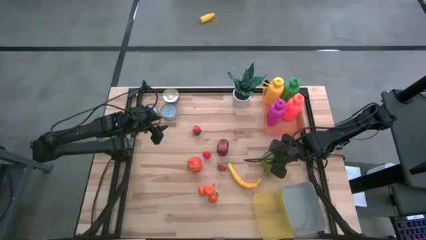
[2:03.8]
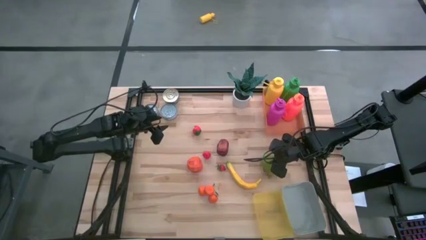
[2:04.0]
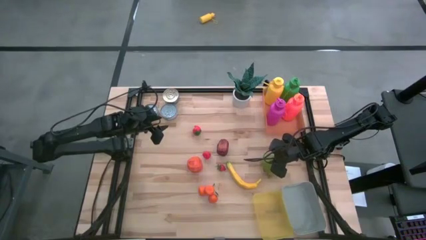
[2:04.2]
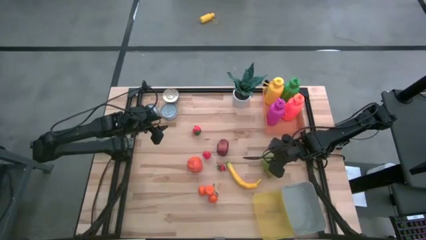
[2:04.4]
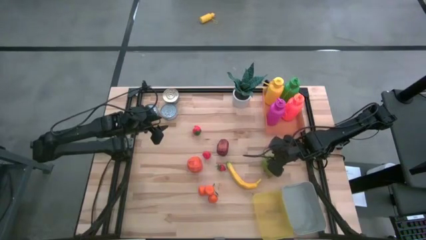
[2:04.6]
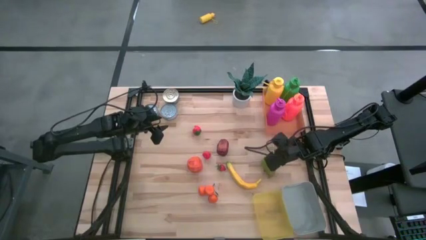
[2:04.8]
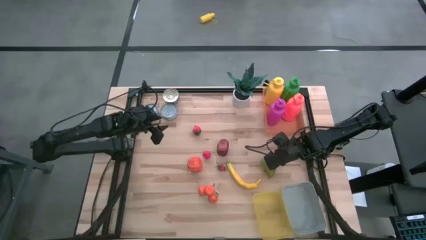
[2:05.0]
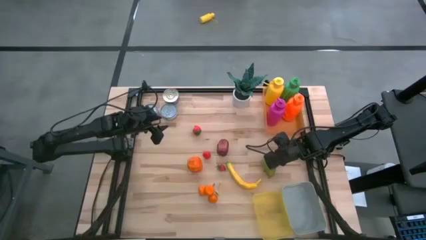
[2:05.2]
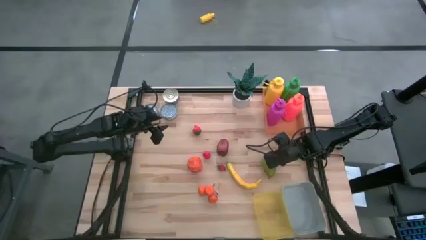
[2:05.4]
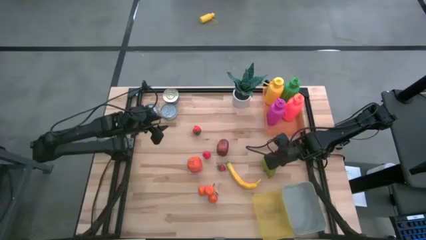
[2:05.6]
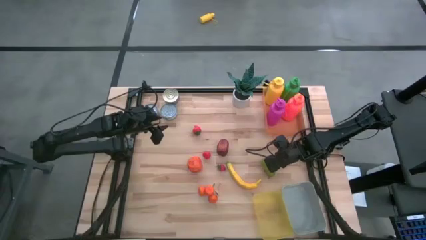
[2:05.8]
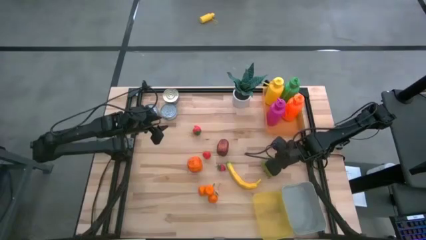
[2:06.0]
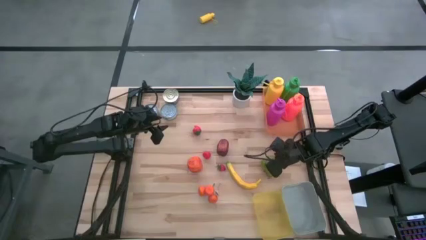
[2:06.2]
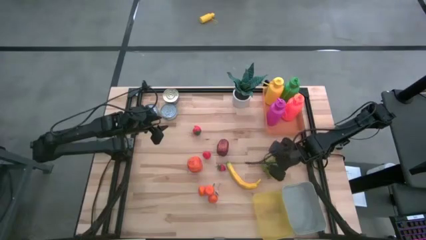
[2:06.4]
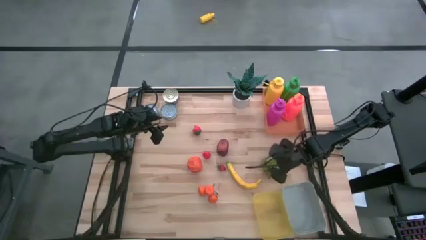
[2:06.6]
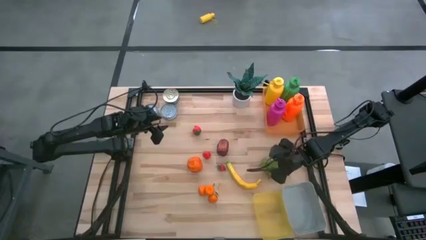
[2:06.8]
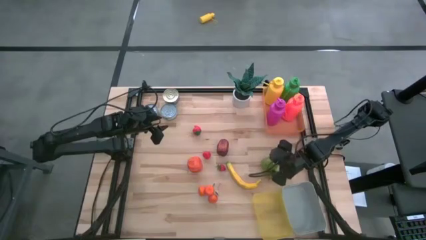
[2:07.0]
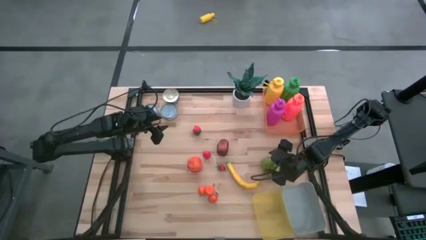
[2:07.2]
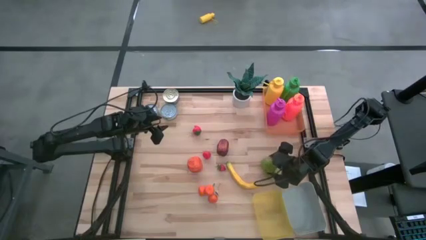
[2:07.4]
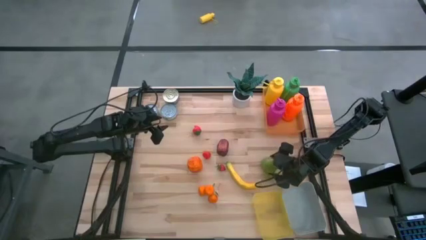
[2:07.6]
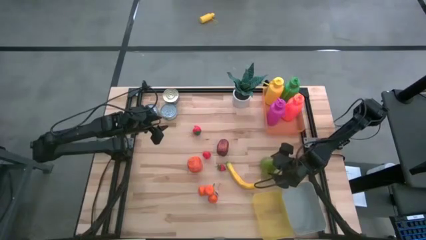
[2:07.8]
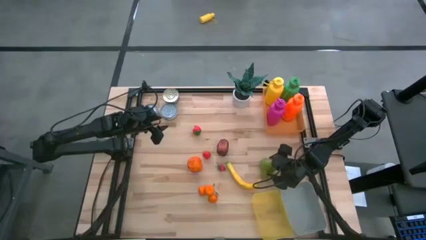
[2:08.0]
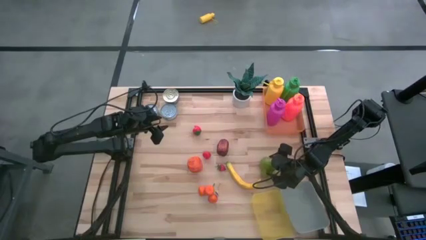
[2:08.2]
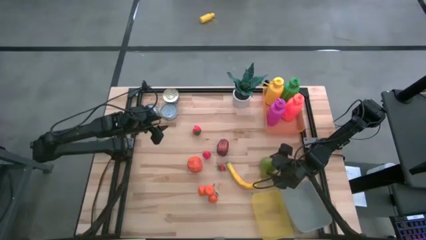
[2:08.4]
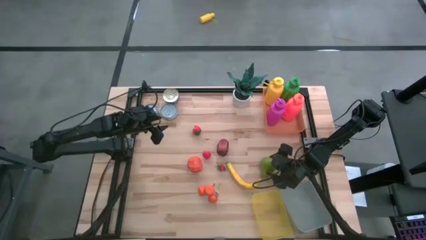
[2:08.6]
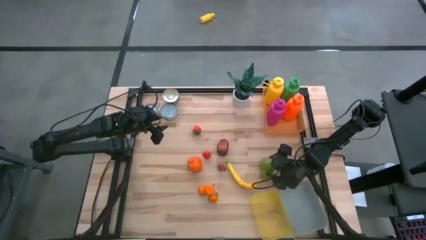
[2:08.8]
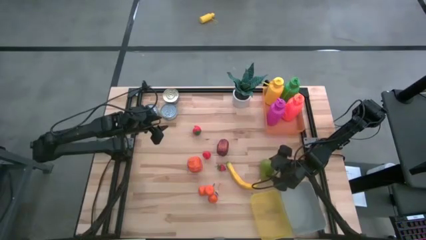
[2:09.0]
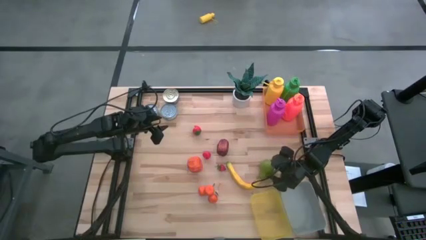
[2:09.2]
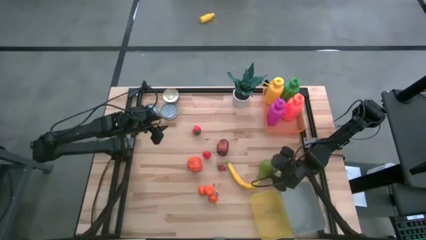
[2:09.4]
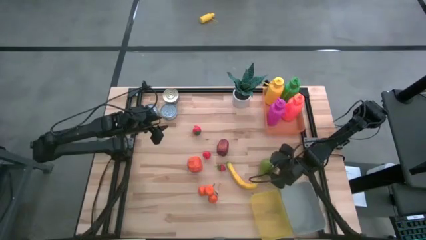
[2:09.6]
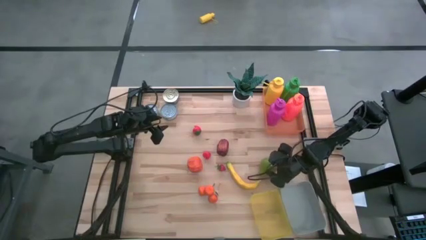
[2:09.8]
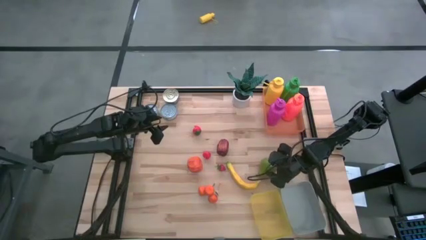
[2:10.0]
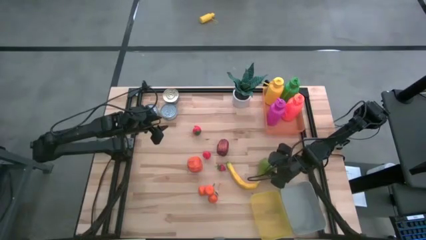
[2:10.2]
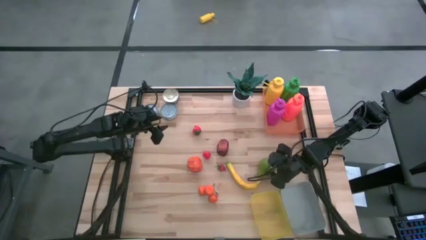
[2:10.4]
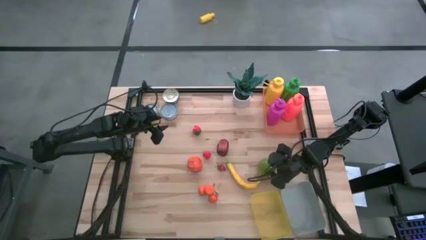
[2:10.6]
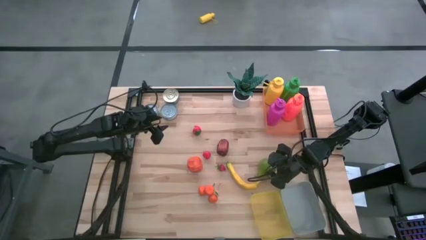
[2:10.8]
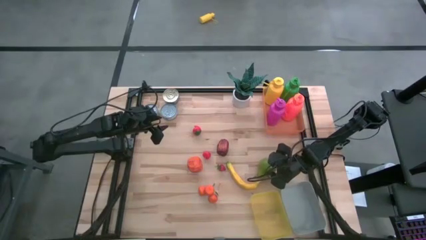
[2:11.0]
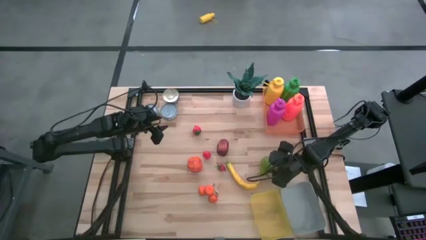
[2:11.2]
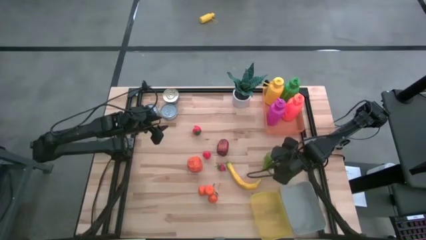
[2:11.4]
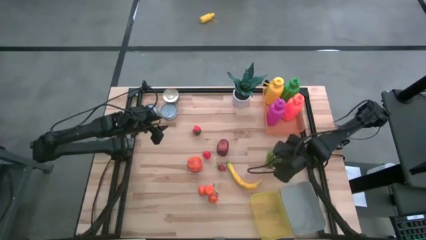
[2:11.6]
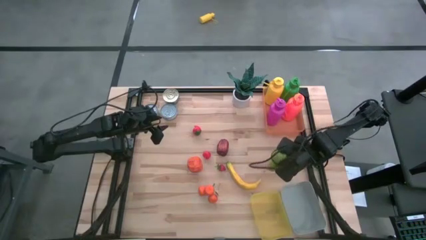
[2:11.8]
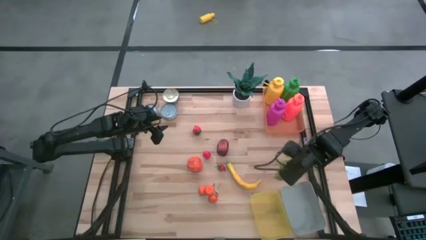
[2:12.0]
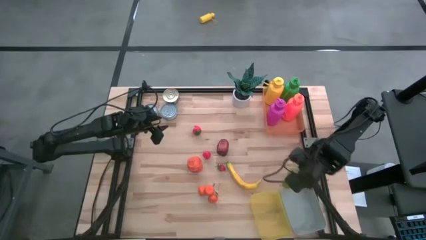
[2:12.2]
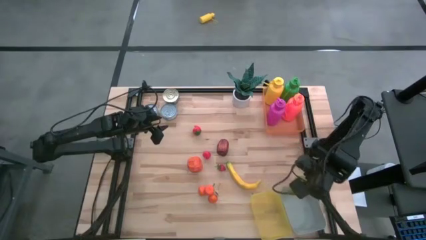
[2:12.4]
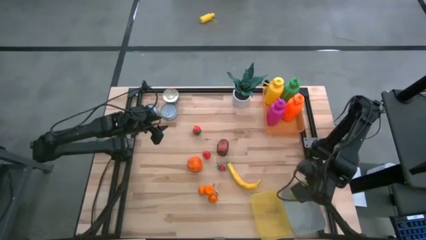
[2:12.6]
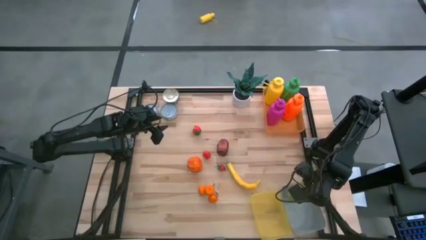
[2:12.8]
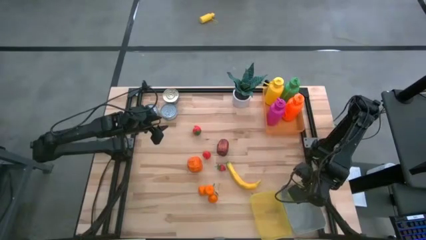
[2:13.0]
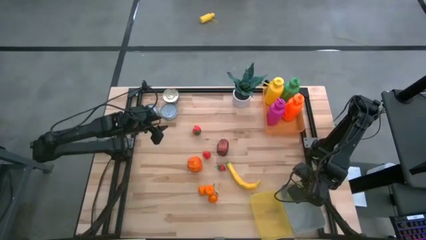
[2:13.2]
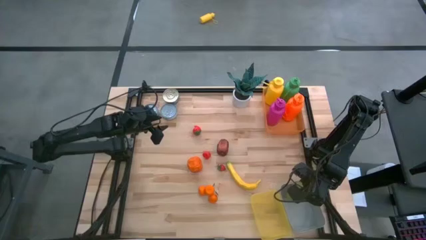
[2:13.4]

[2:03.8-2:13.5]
Task: Pick & Place Food Item
Put the green pear into the gray bin

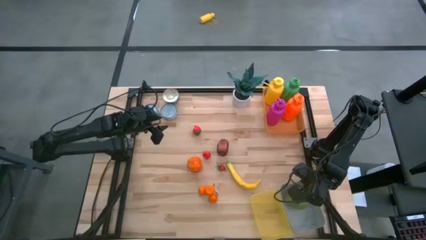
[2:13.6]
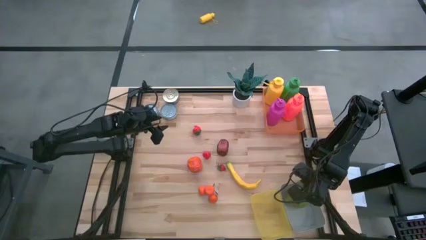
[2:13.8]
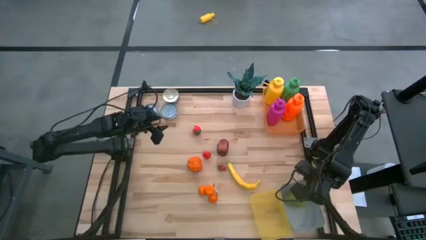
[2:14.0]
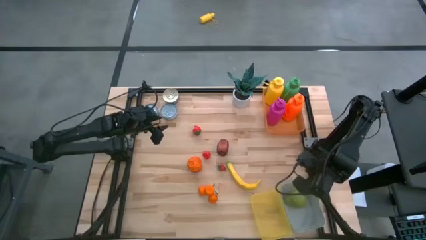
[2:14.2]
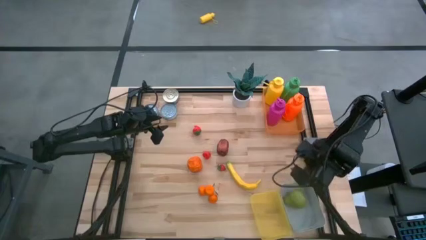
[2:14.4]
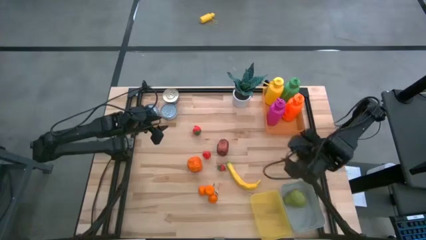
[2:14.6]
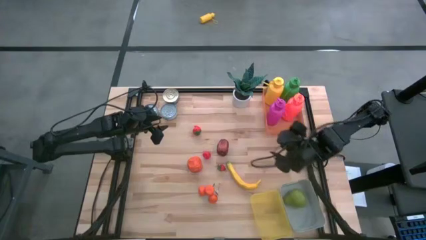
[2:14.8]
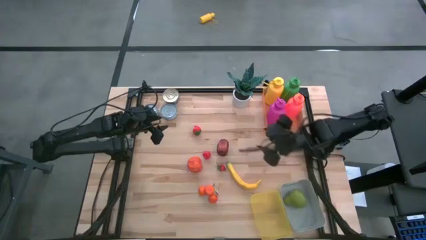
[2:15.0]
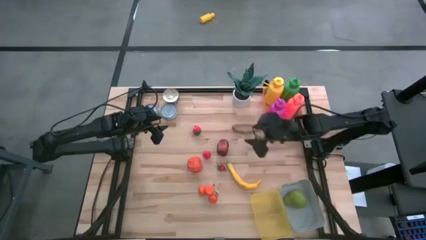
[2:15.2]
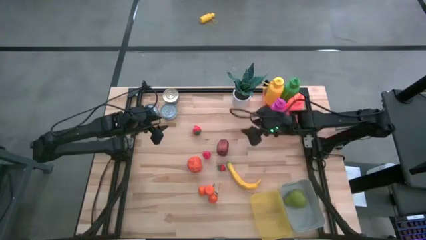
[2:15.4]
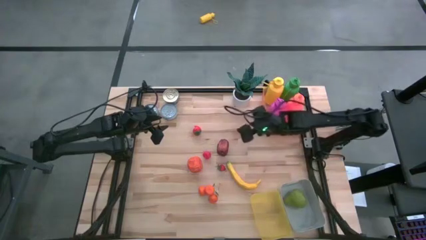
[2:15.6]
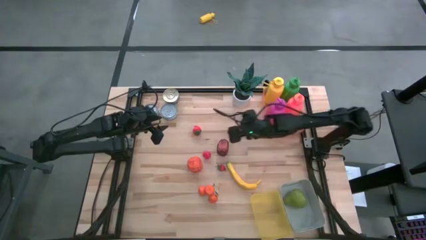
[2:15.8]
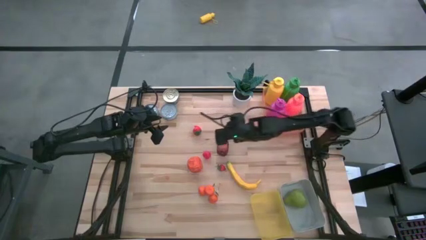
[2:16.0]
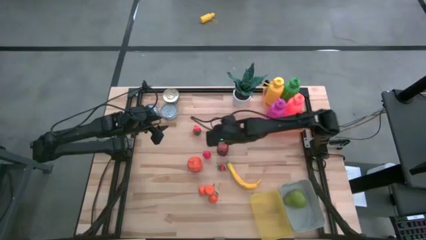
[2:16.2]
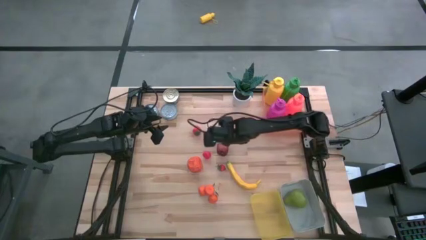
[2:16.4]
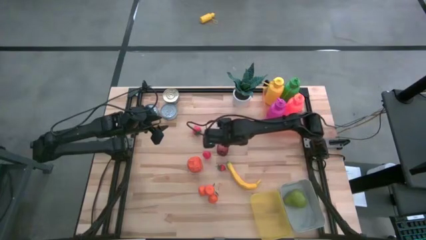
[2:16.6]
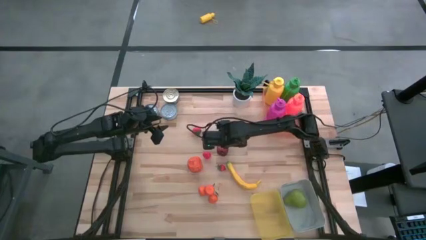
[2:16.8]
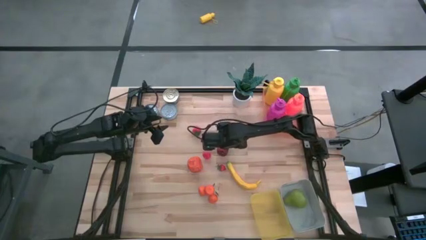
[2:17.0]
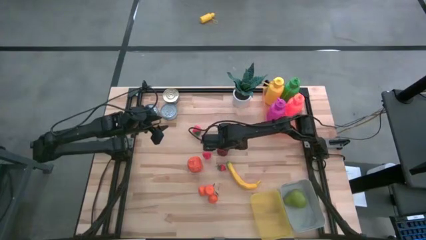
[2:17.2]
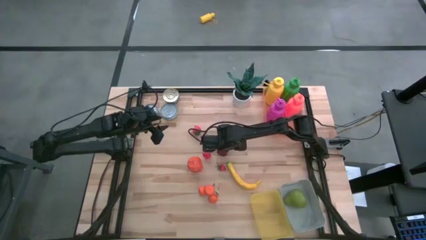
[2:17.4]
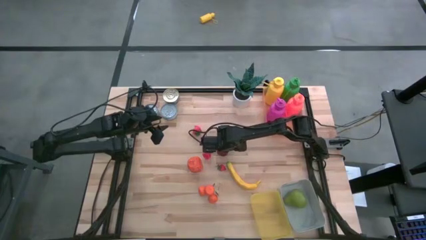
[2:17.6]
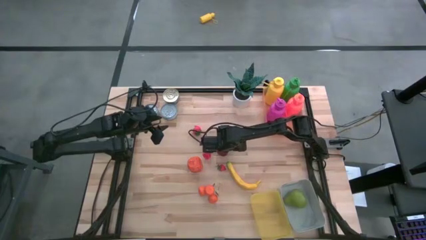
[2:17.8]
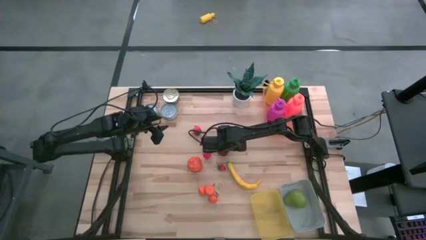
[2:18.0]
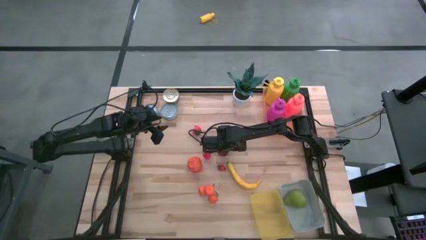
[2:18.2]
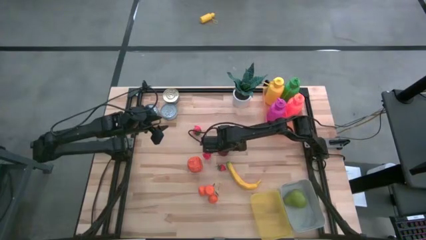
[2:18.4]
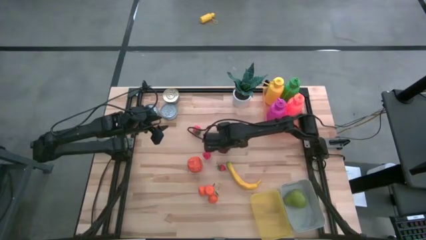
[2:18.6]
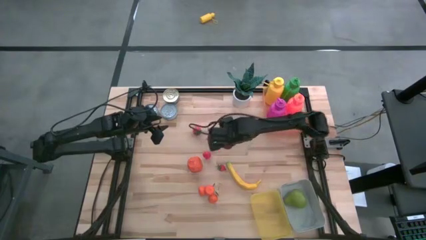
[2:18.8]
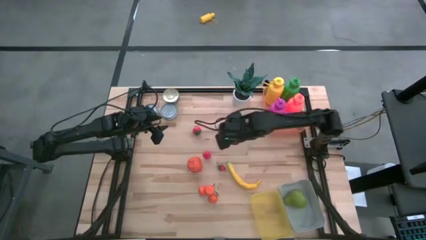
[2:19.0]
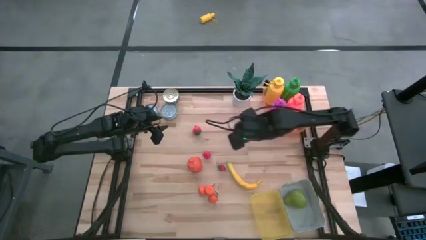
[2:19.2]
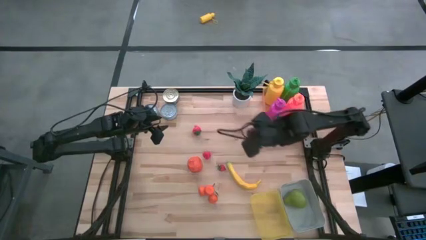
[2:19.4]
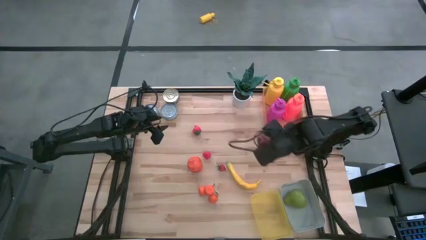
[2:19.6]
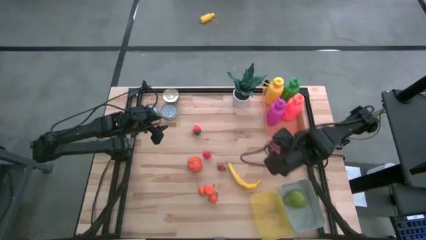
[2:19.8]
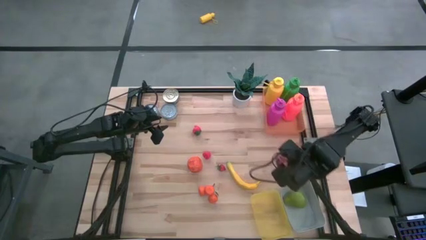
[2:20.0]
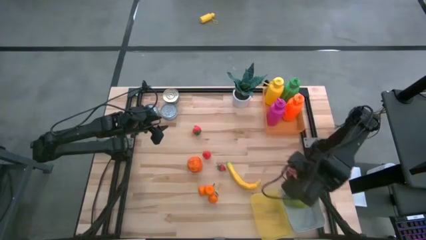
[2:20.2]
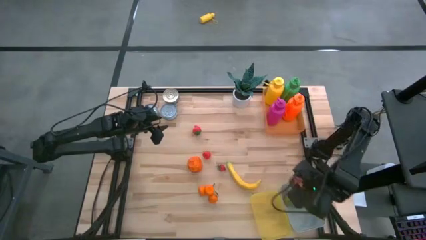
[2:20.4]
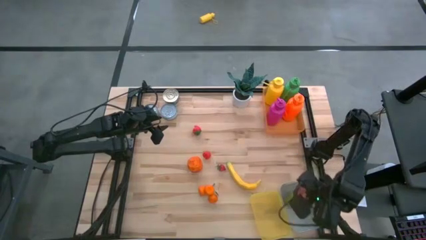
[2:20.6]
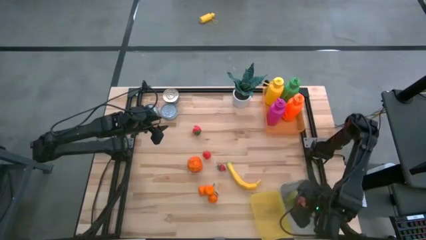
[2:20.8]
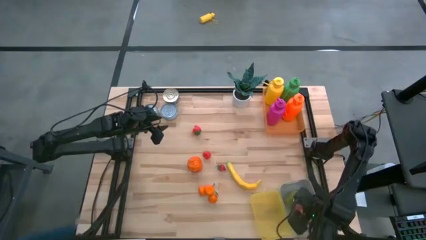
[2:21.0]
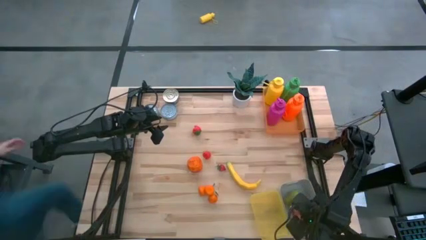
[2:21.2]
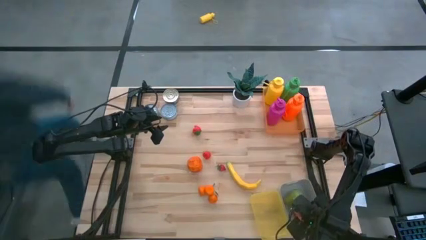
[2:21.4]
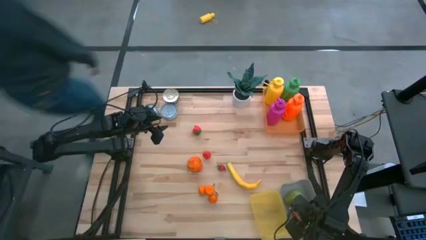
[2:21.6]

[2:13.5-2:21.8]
Put the red apple into the gray bin
